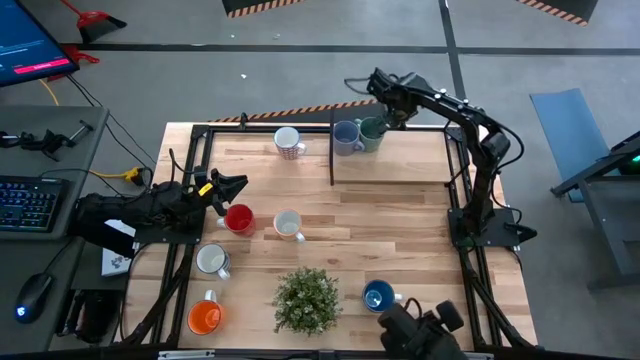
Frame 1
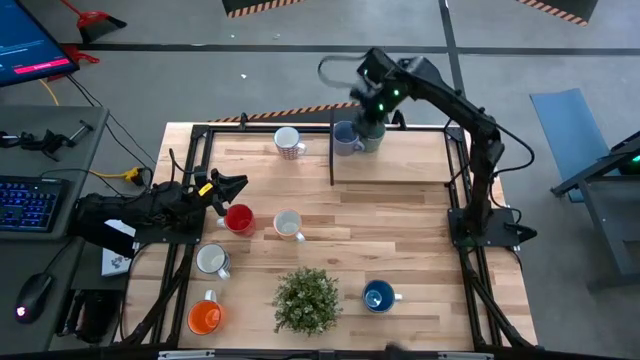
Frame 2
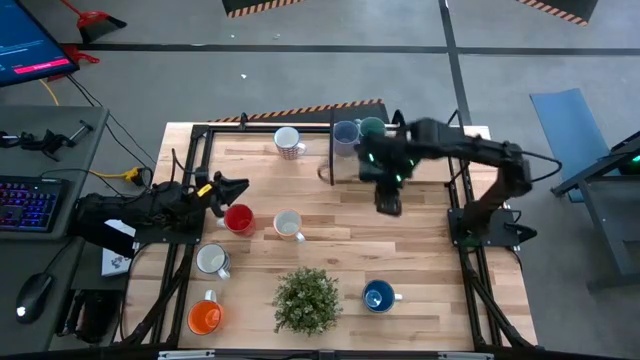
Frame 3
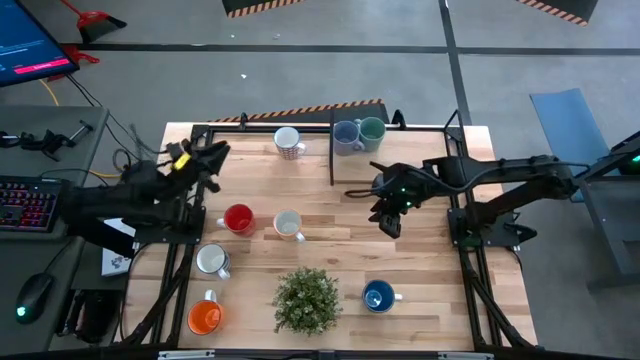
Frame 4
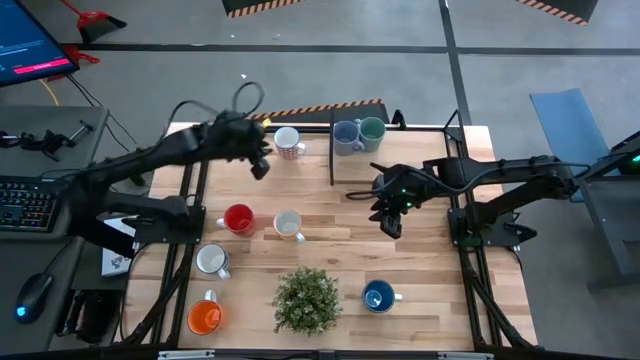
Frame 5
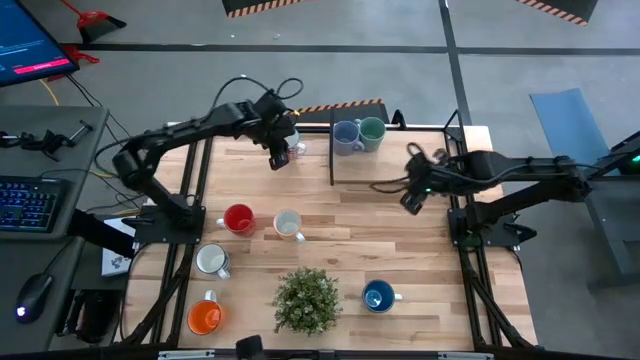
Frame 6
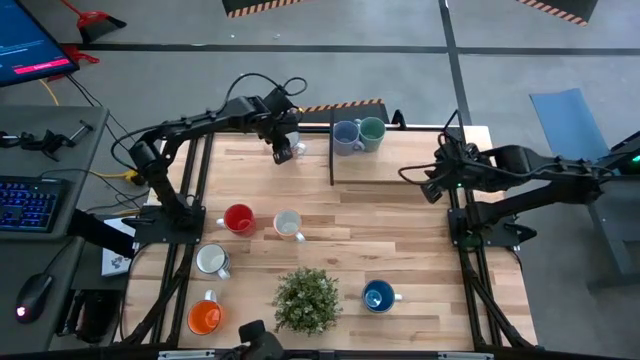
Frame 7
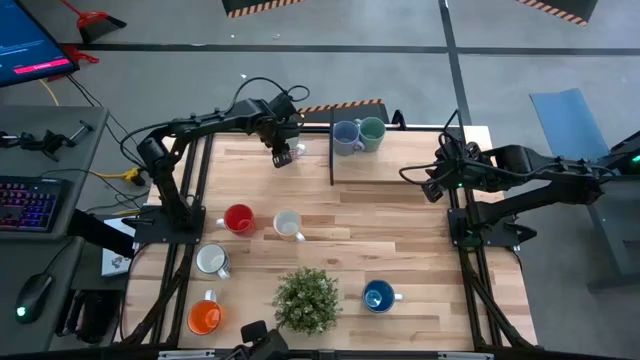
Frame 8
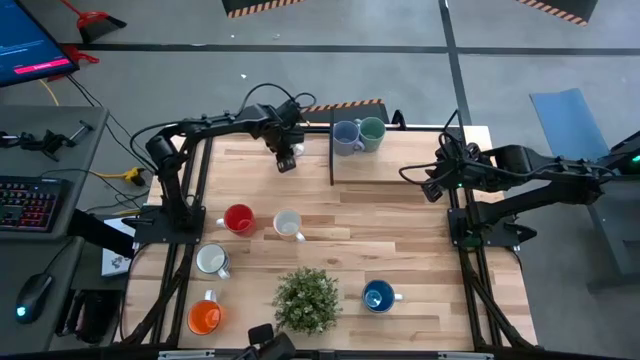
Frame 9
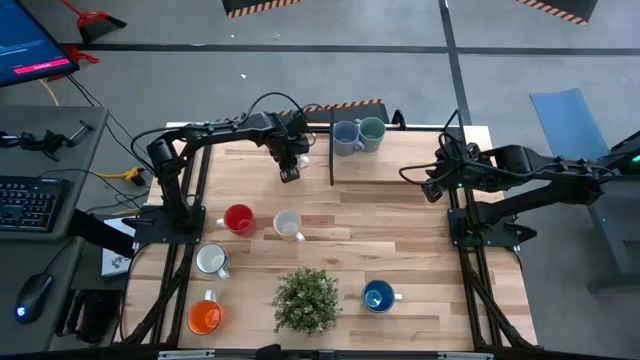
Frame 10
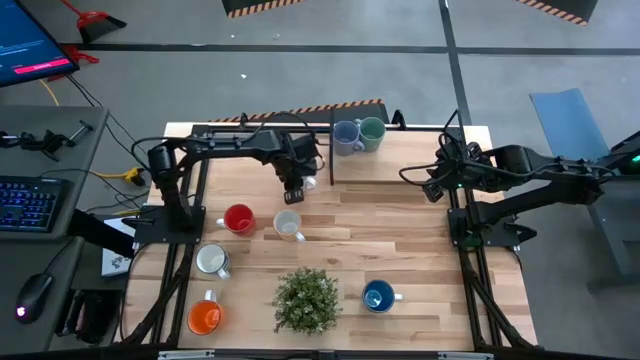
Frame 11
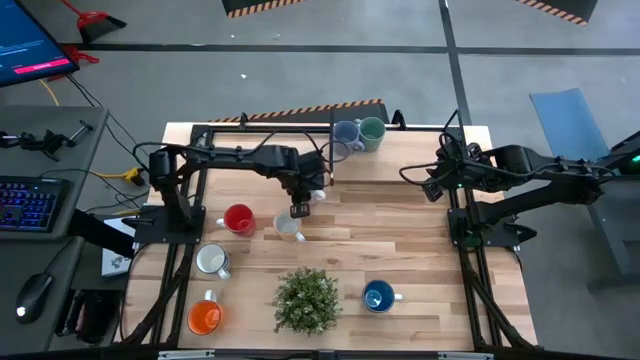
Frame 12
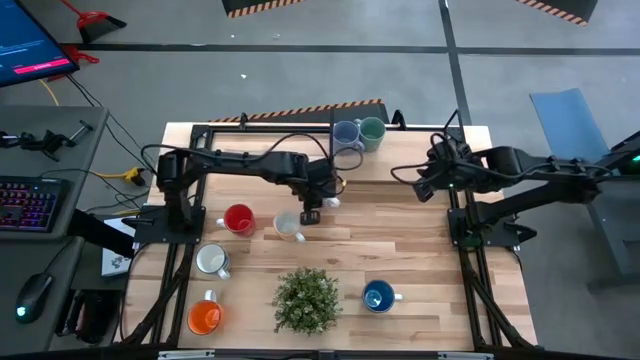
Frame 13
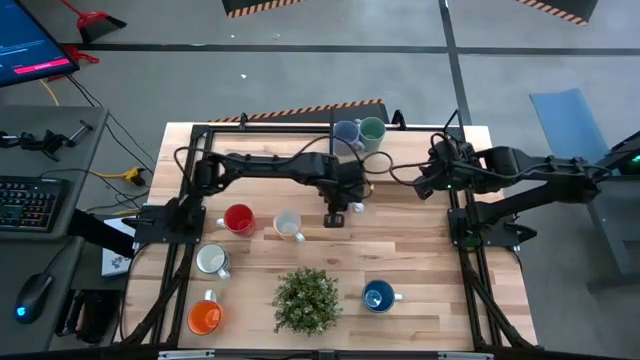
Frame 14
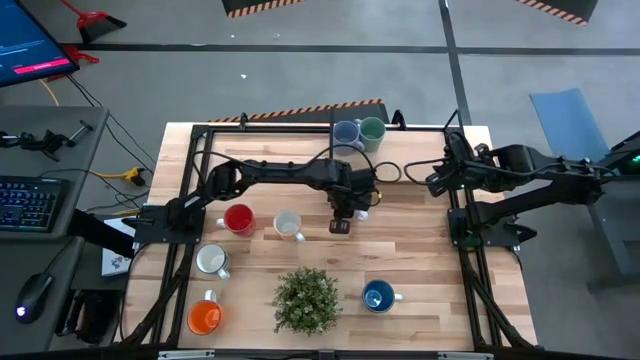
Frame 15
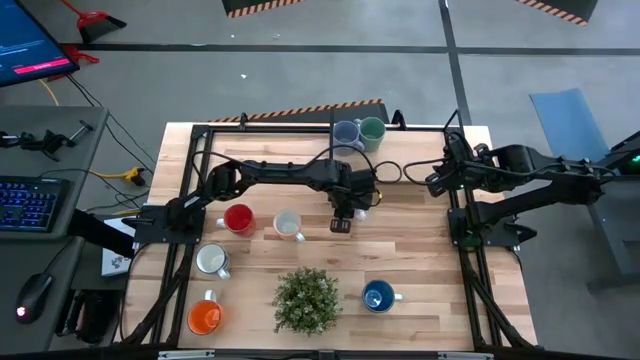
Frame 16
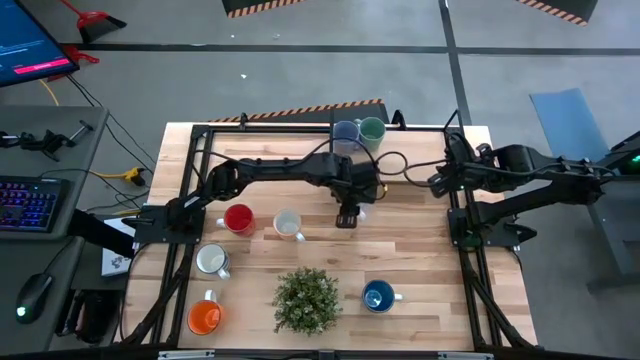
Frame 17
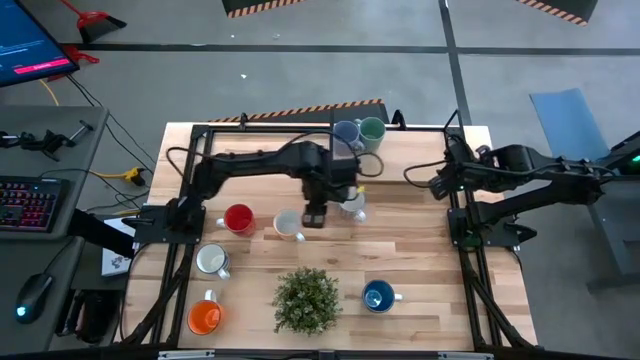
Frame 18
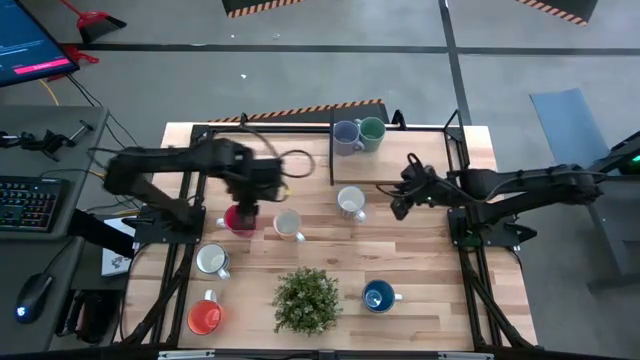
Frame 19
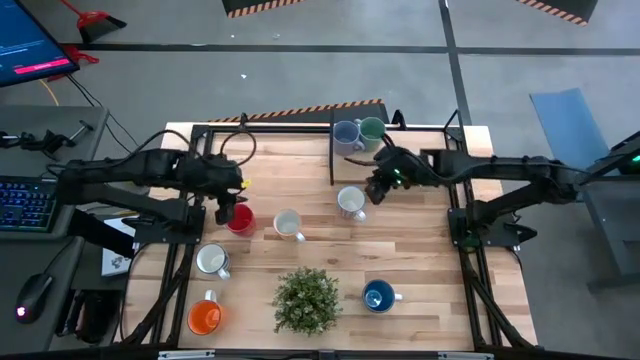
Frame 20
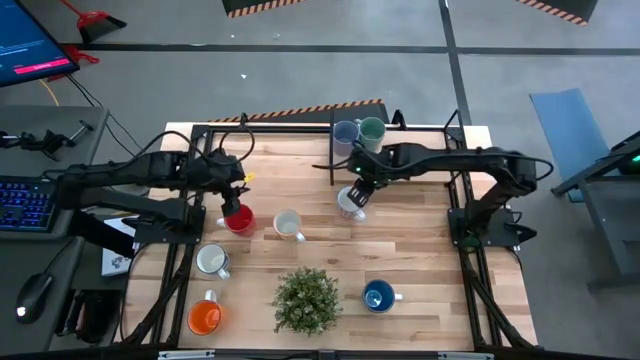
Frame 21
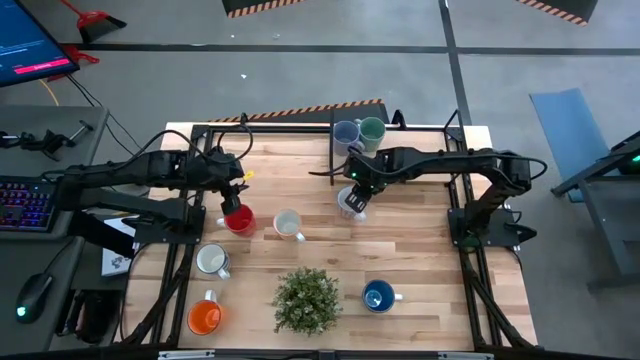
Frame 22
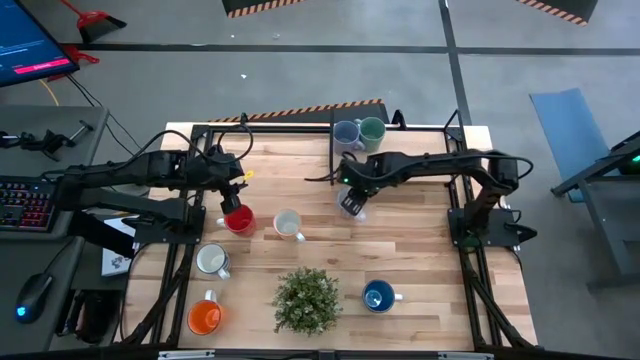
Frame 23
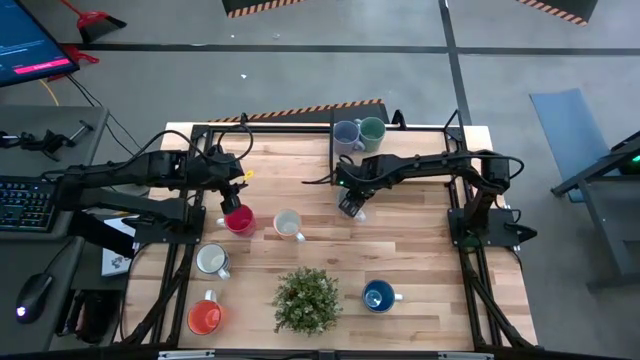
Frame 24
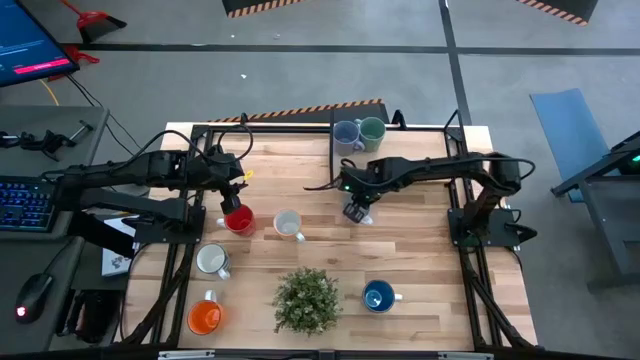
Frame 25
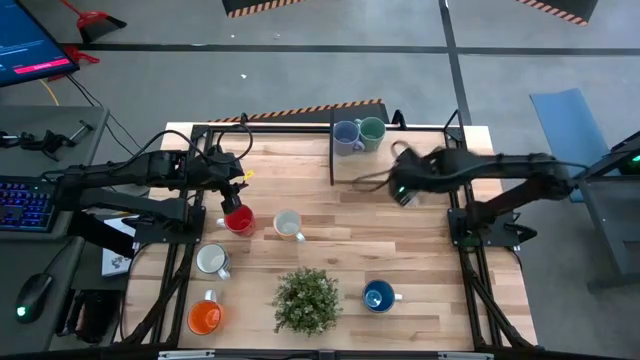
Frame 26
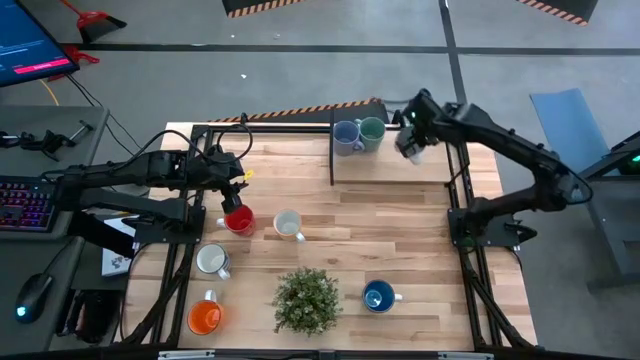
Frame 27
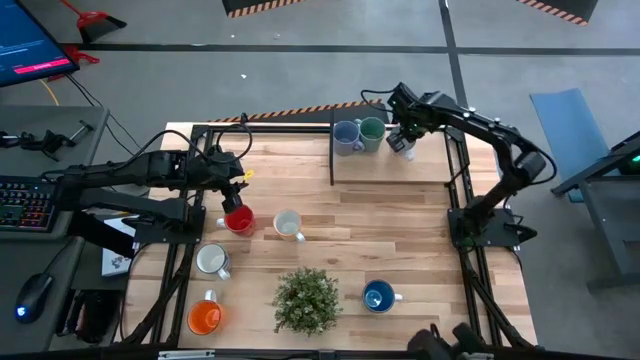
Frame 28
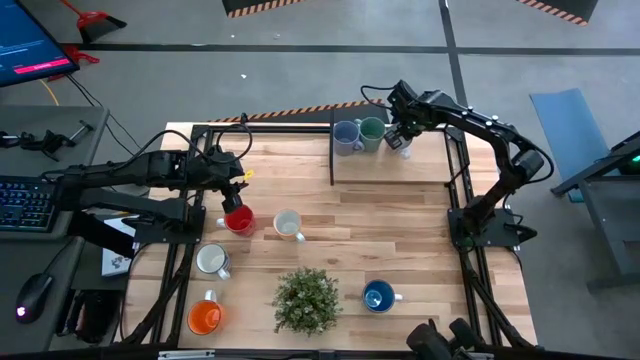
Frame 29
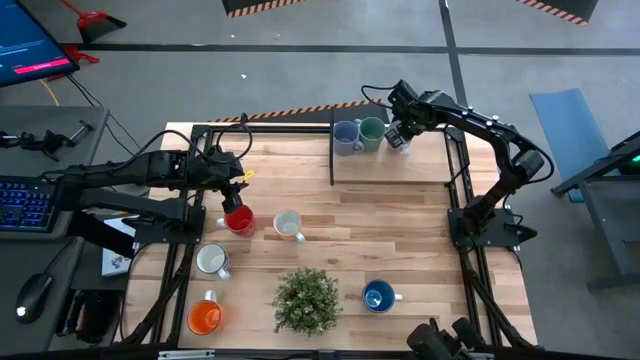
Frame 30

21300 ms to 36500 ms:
Task: Place coffee mugs
Put the red patterned mug on the shelf

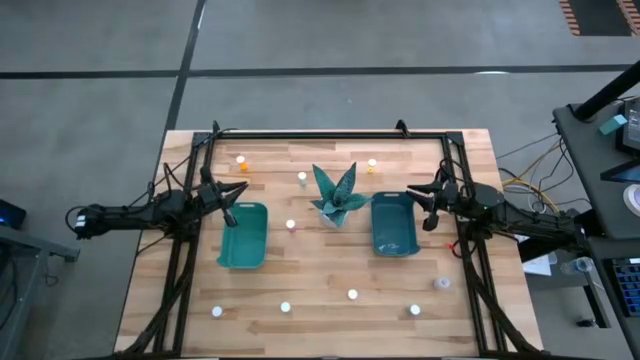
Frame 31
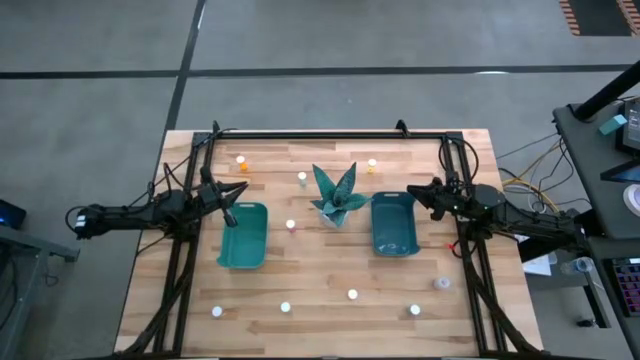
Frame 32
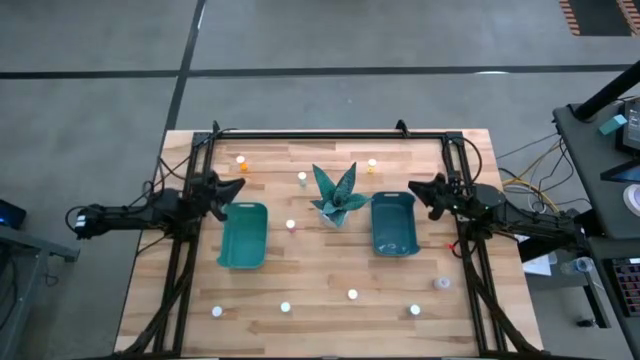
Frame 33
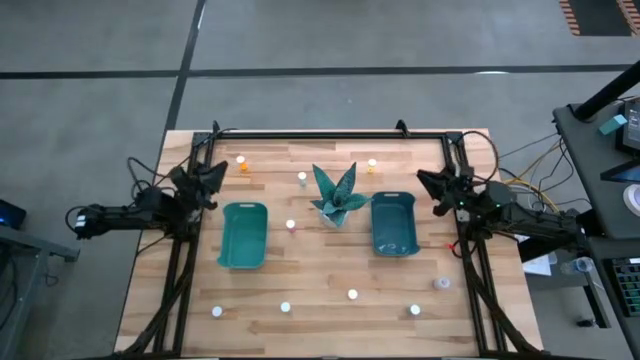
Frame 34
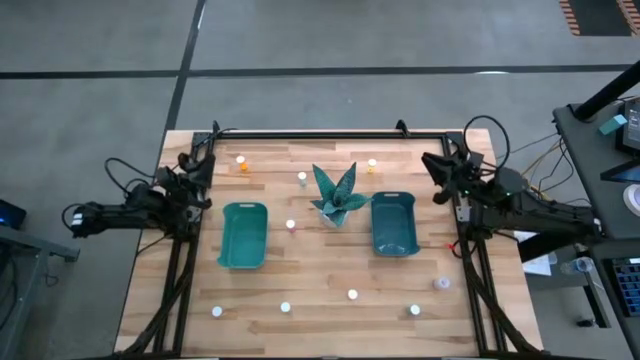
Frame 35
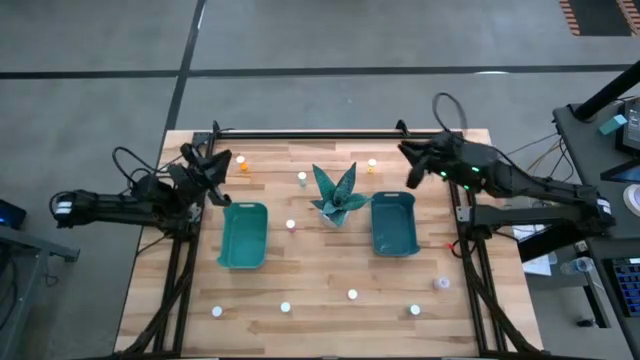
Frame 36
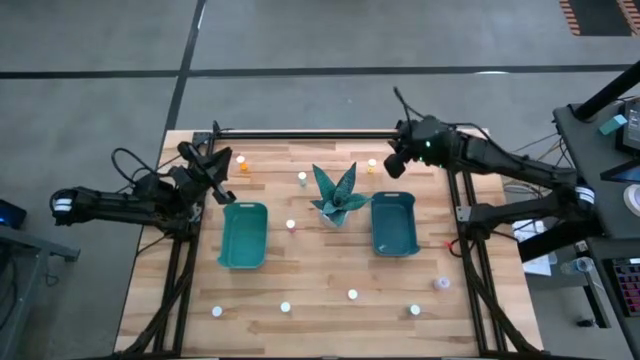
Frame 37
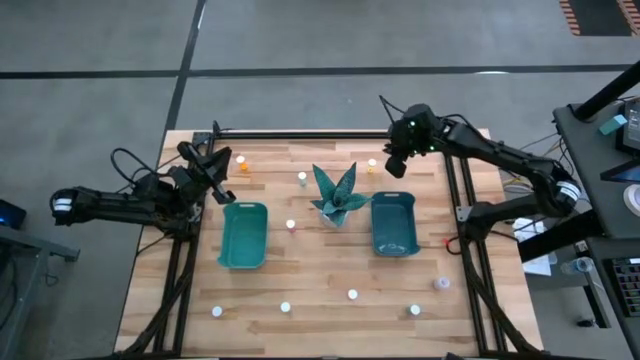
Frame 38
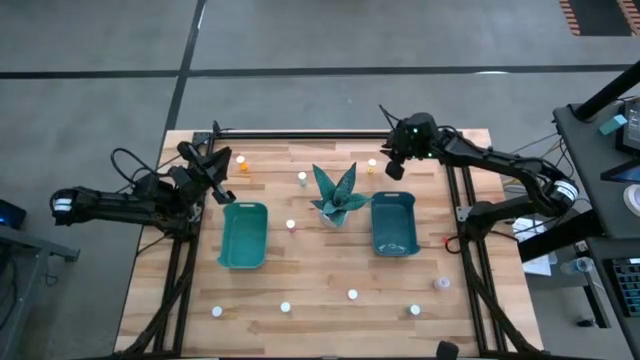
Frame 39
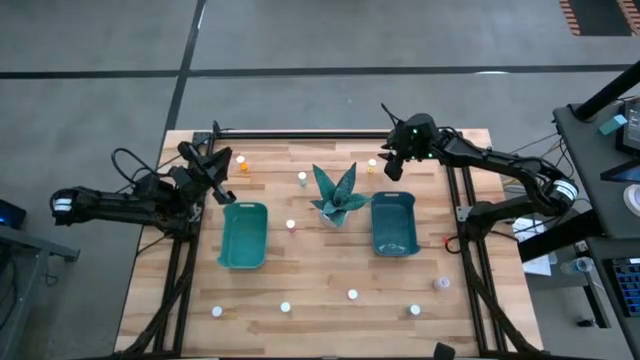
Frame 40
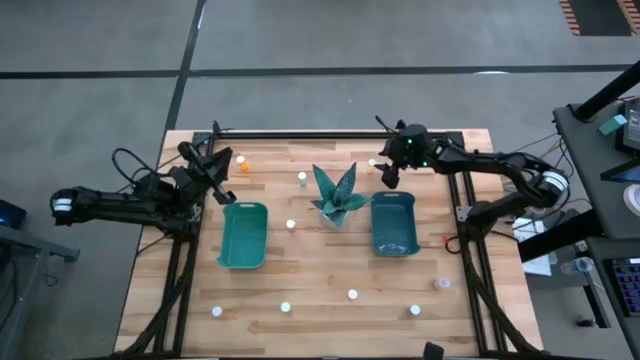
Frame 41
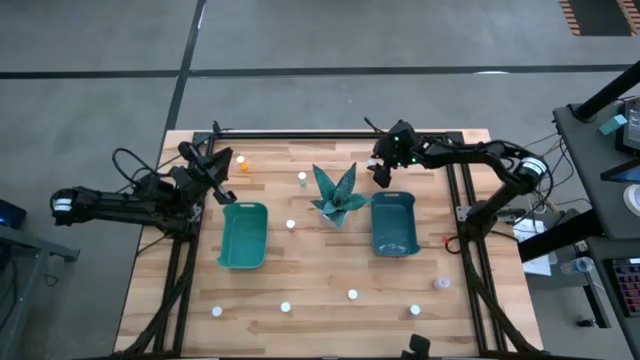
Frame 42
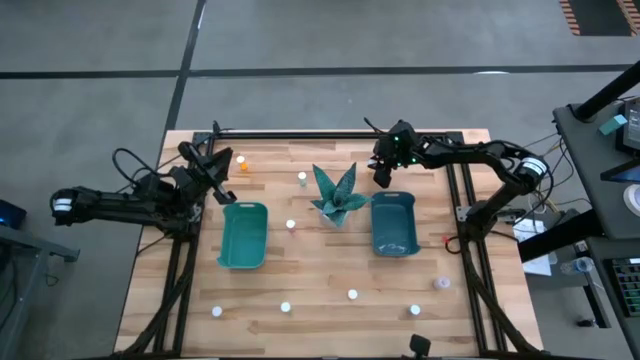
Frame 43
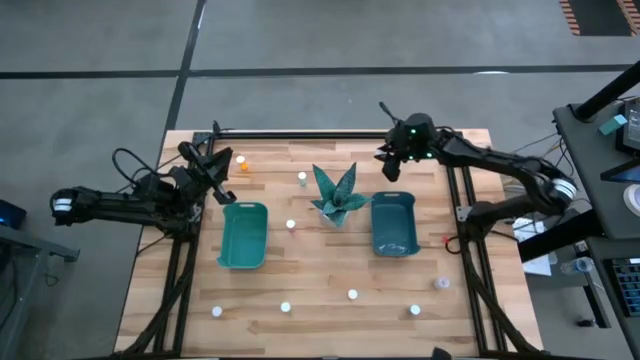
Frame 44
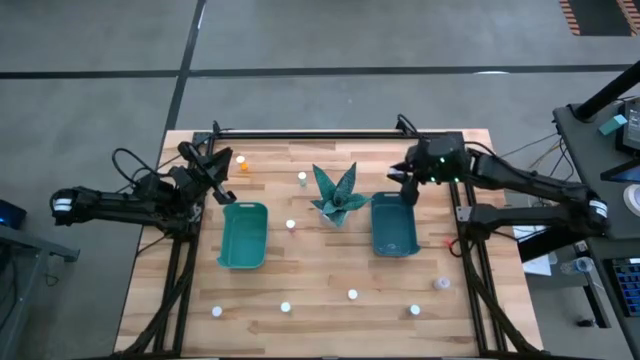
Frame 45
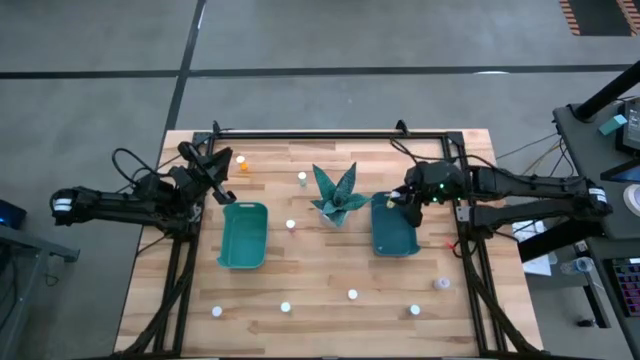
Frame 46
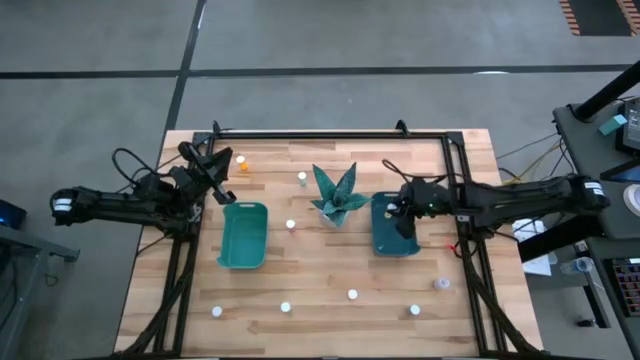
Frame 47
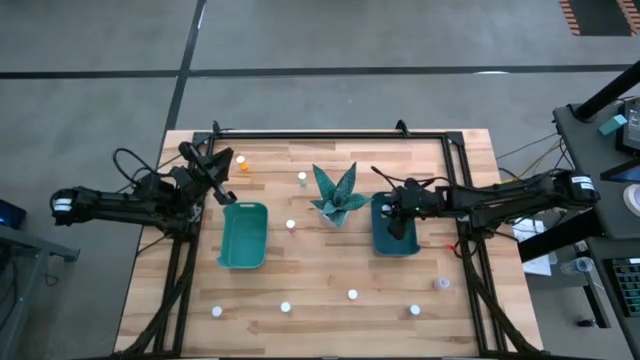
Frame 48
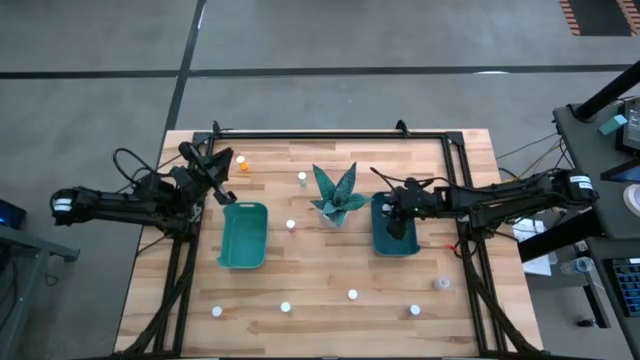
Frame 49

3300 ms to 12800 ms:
Task: Pick and place medicine bottles into bin by pill shape (circle, oval)
Put the top yellow tablet bottle into the blue bin
